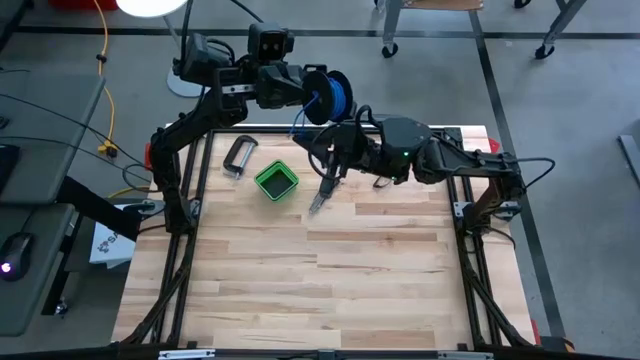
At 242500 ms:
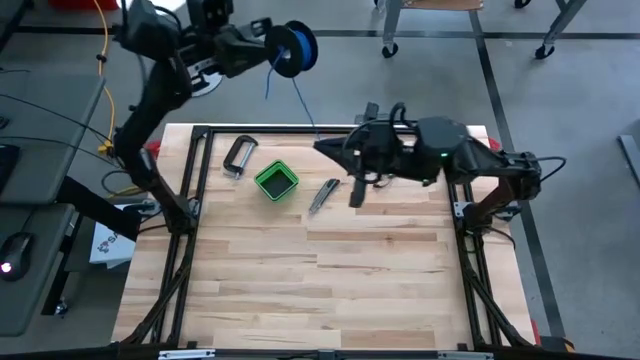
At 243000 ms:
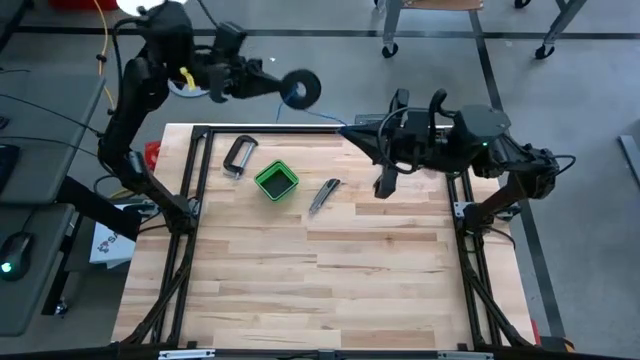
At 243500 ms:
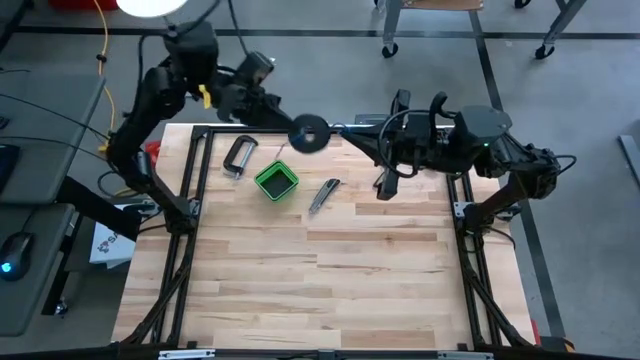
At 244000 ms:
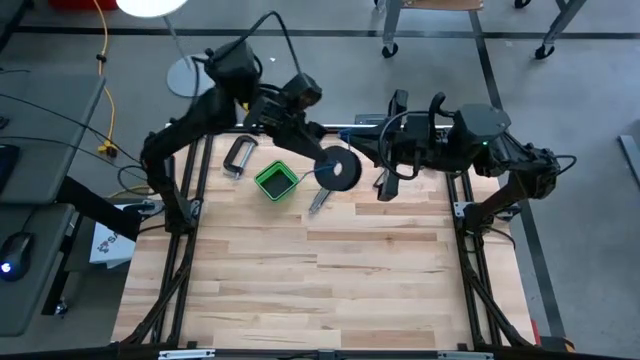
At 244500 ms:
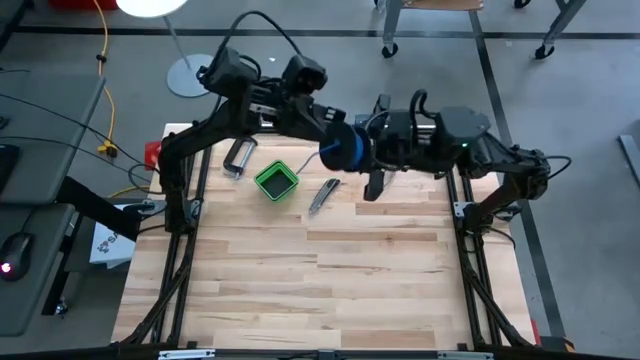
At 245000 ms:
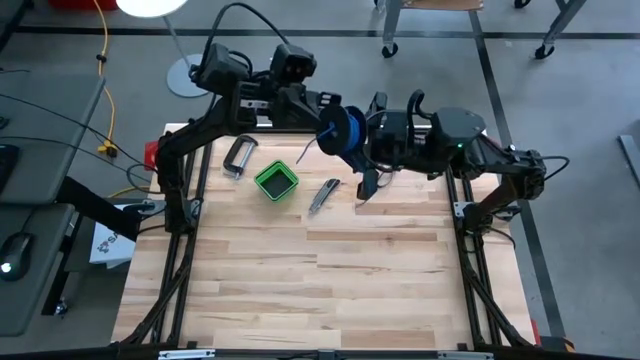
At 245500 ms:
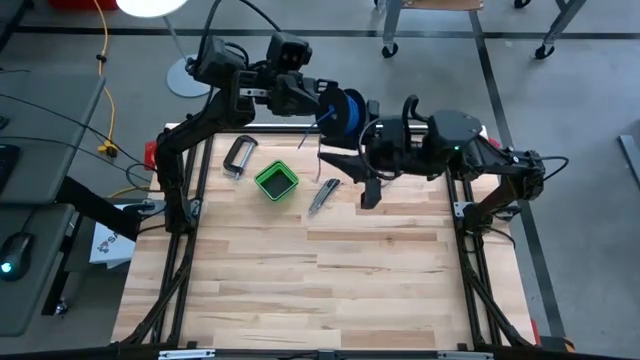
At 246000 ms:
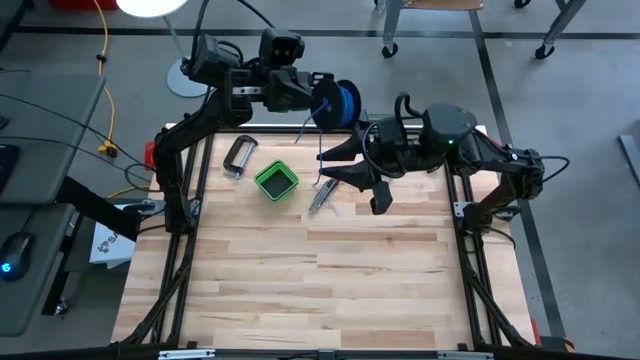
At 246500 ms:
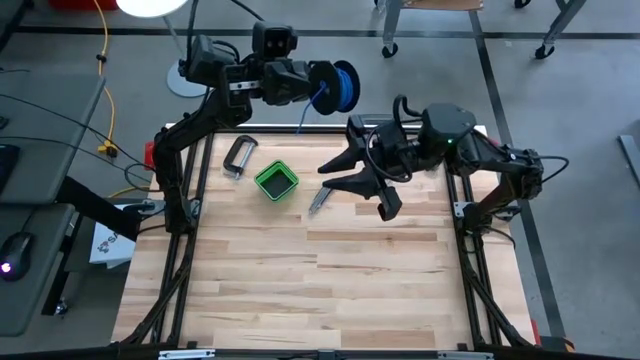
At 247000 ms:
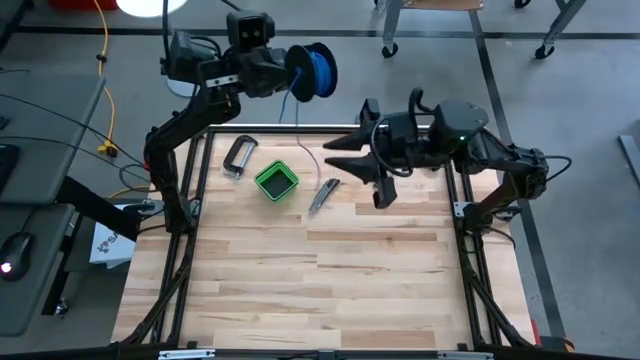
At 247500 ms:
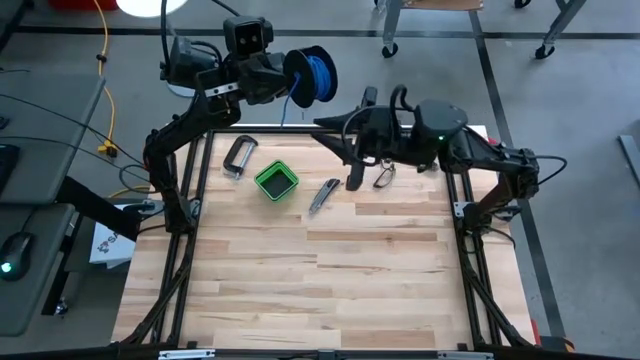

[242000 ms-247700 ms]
Task: Coil cords
Coil the blue wire onto the spool

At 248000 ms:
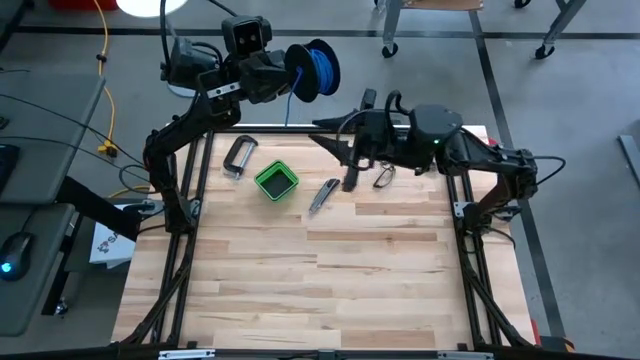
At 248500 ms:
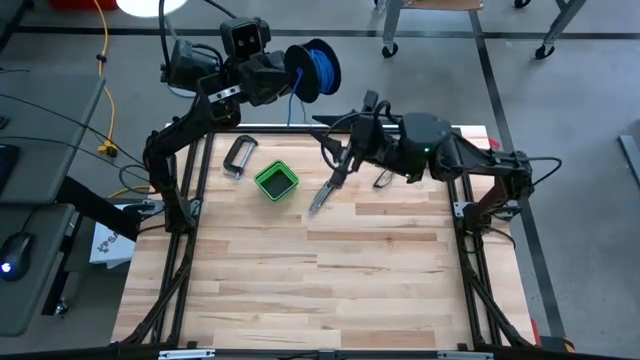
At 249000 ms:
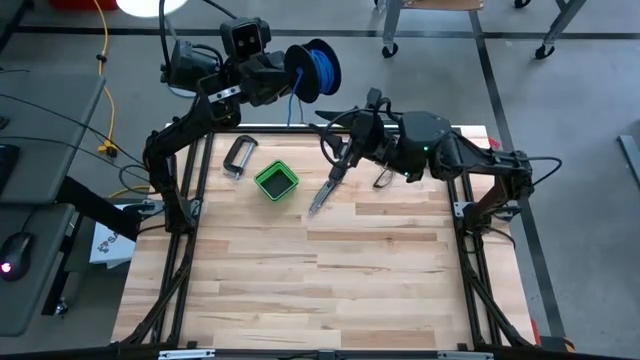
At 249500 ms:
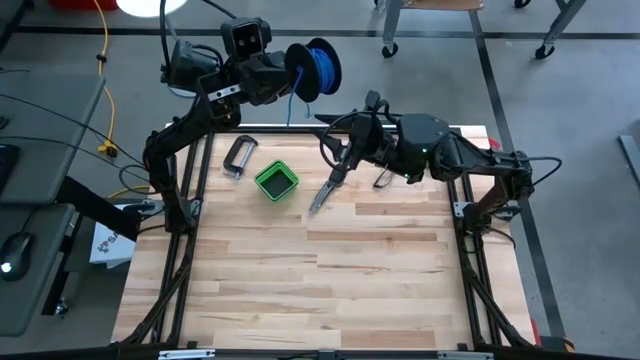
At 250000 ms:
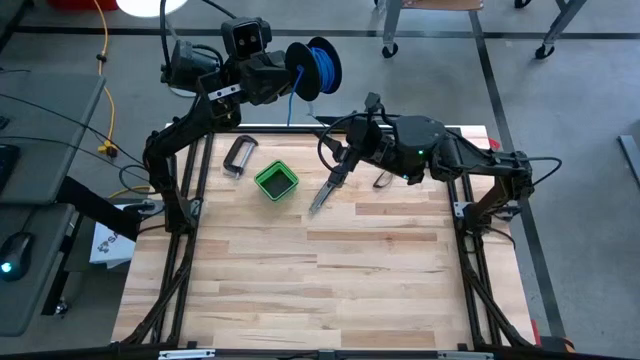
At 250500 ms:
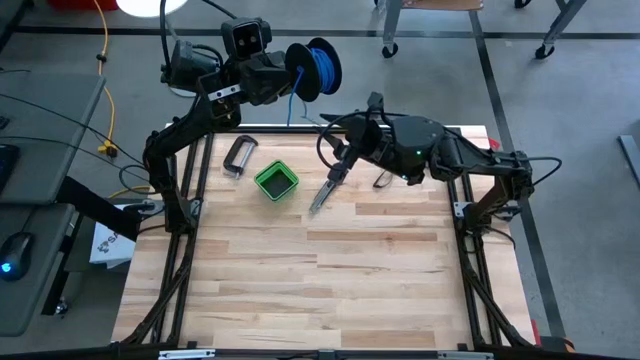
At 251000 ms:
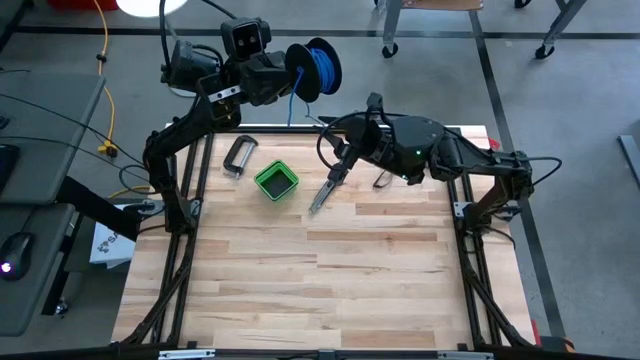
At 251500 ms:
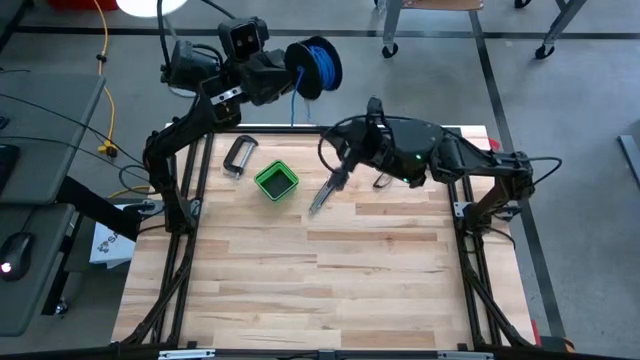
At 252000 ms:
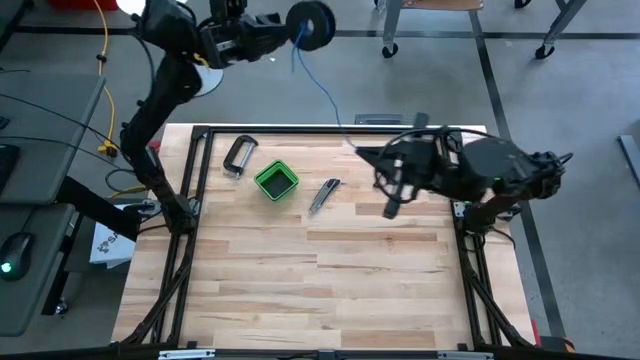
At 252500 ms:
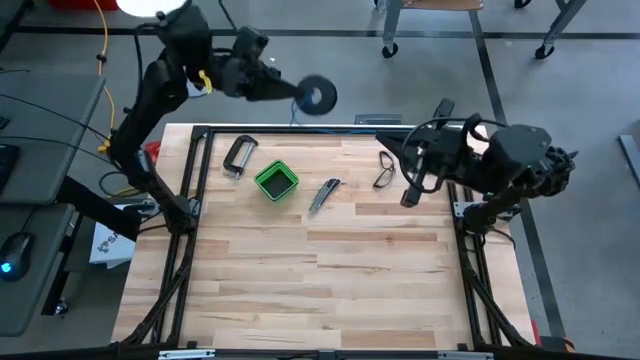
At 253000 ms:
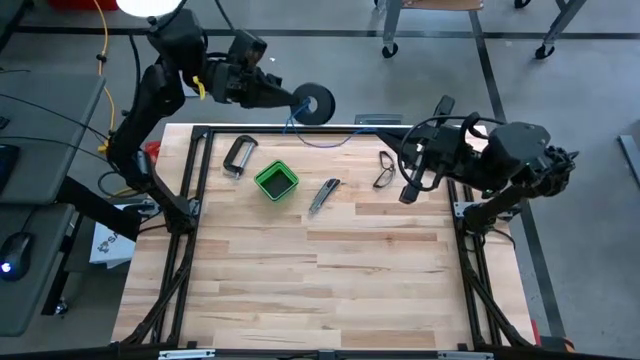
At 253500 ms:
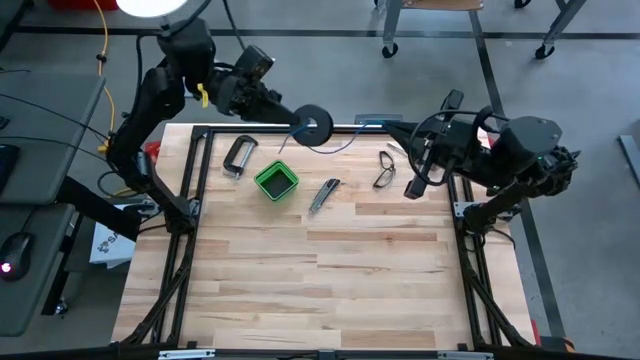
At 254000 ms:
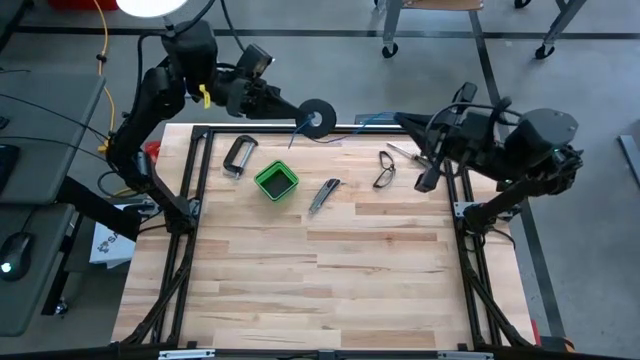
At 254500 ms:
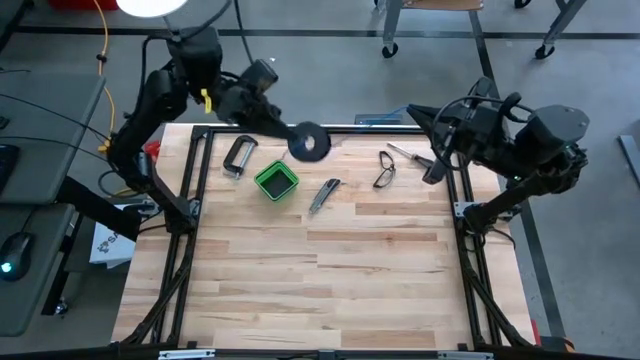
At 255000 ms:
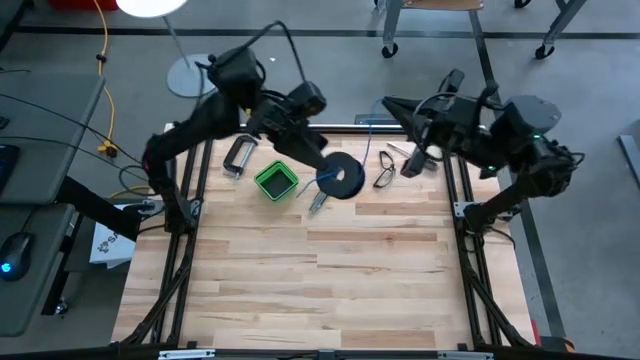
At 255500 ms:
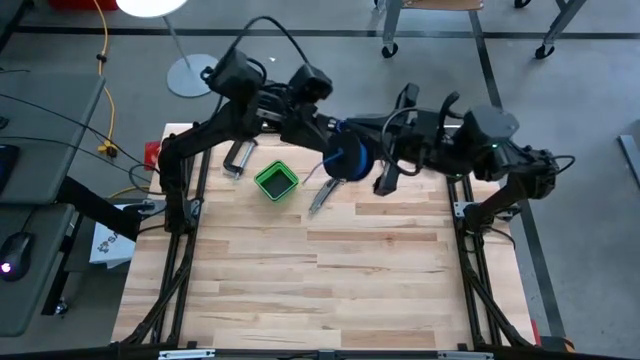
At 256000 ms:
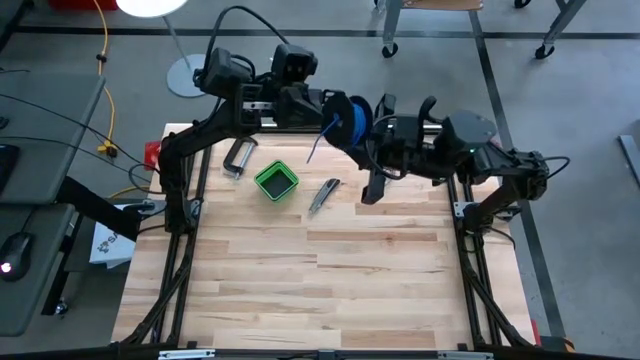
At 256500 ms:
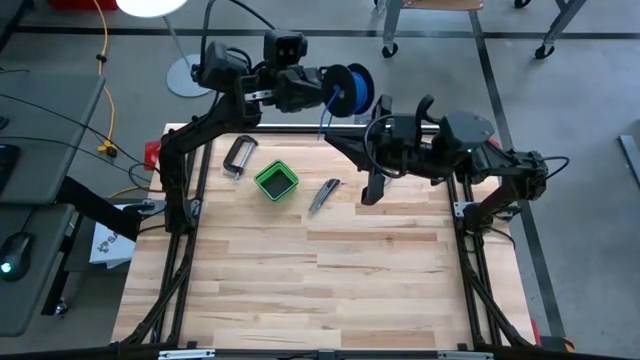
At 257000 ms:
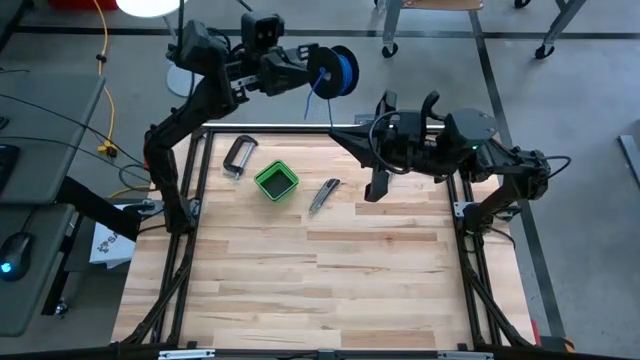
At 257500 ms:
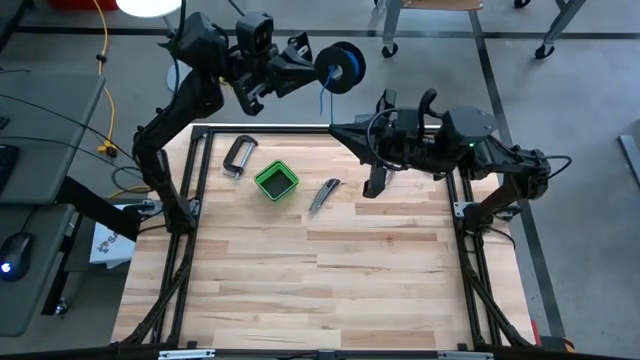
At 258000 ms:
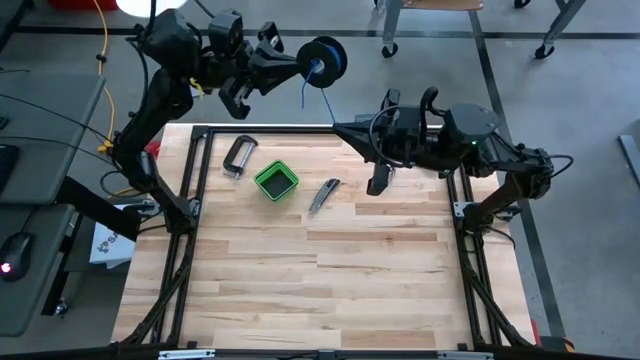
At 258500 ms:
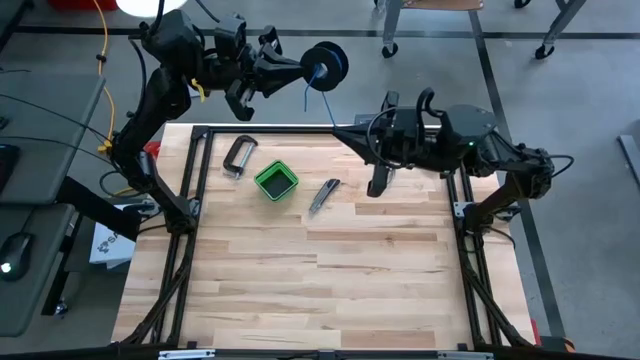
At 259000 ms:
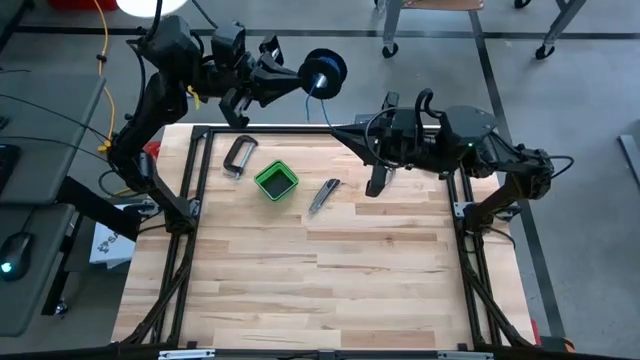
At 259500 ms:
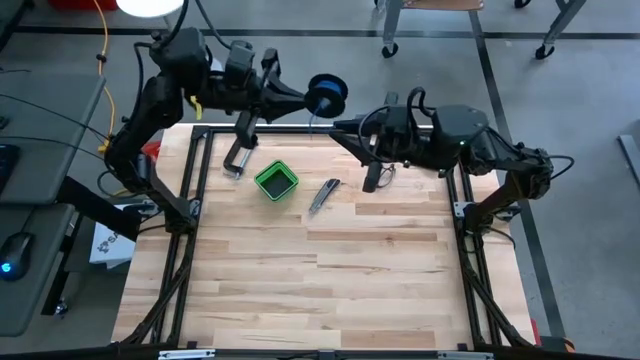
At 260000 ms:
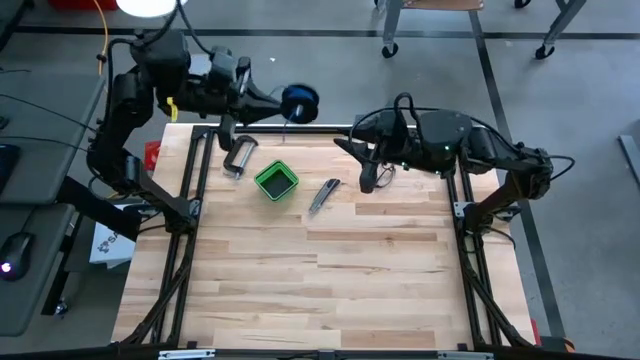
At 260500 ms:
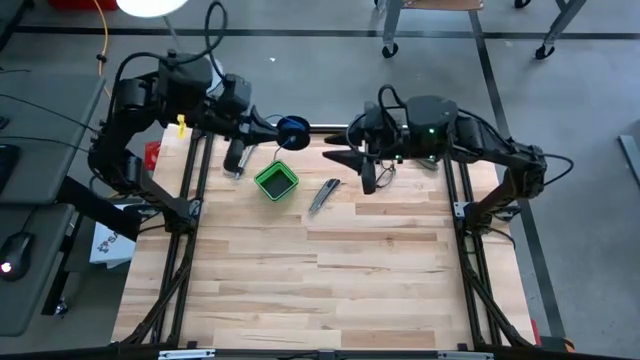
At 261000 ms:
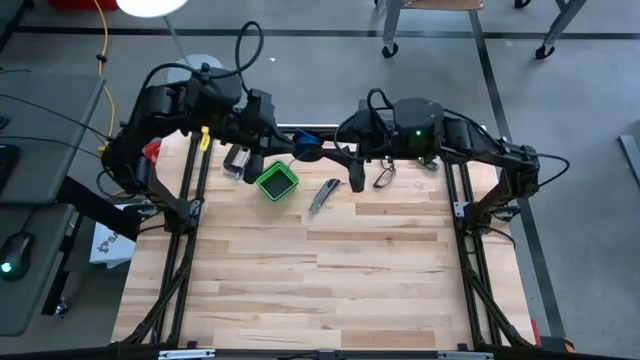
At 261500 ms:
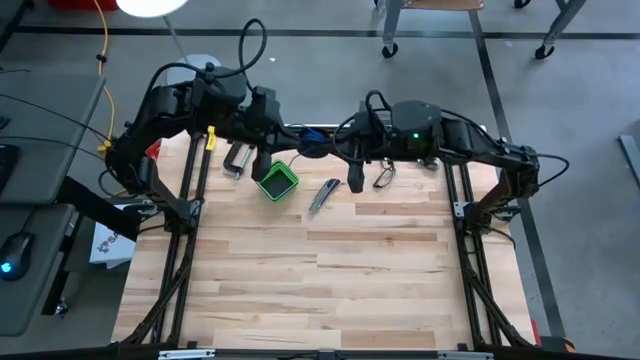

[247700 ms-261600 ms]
Coil the blue wire onto the spool

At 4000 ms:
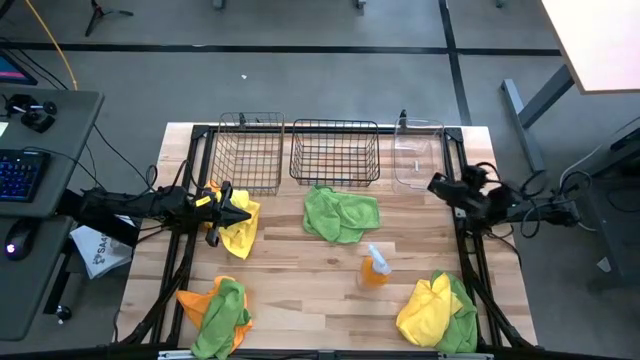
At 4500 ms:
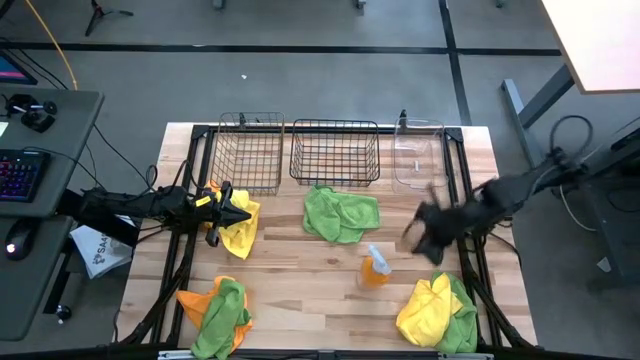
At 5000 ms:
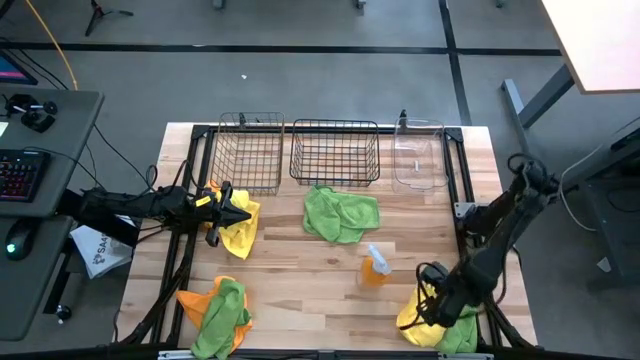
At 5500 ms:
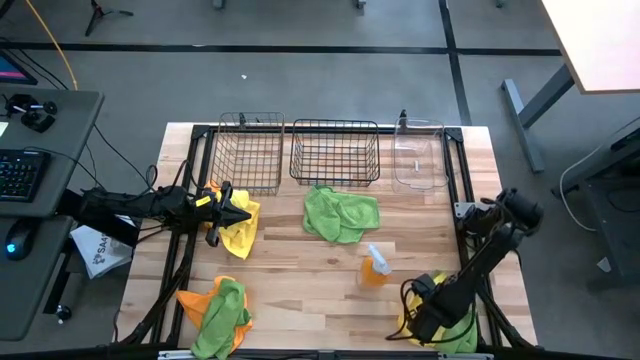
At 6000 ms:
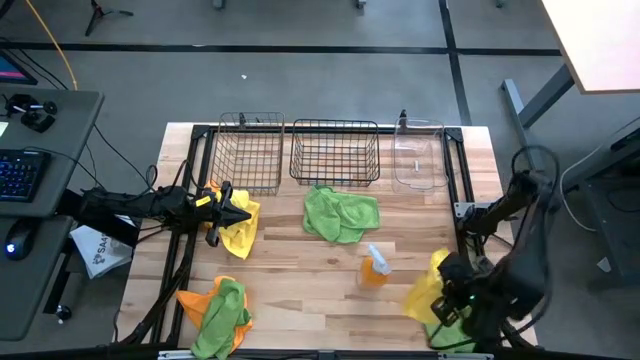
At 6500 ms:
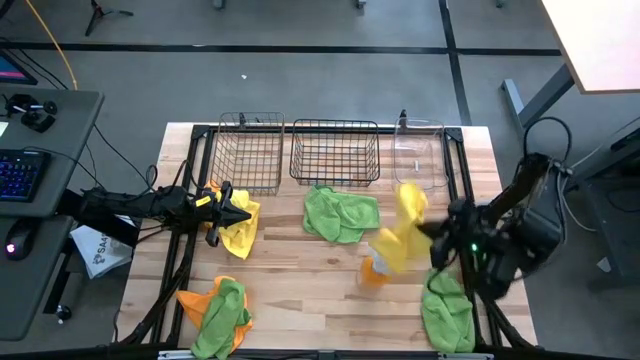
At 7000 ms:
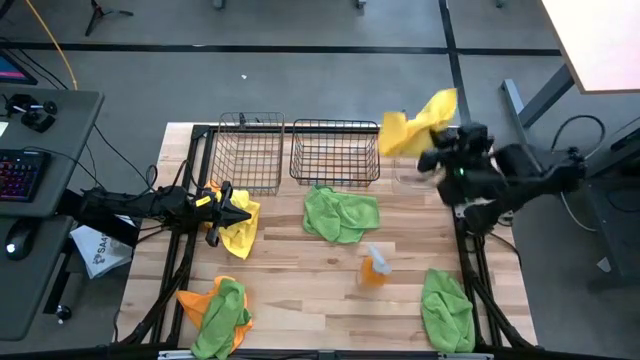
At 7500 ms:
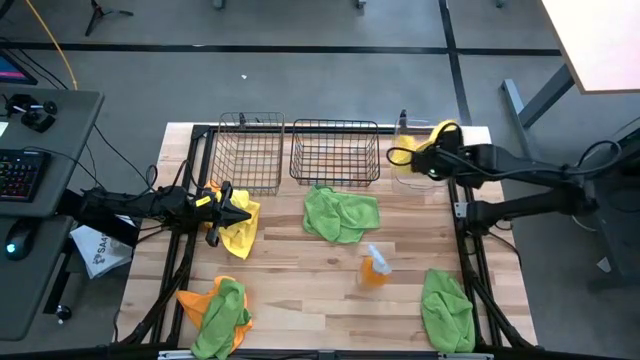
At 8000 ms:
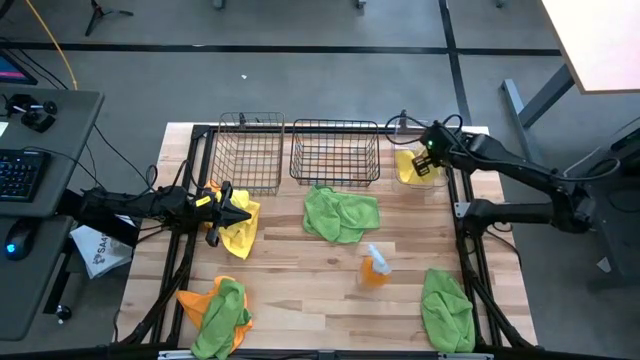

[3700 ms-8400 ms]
Task: Sort microfiber towel by color & place in baskets
Put the bottom yellow microfiber towel into the transparent bin
